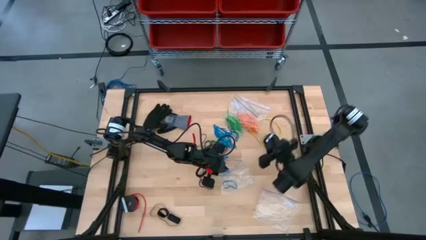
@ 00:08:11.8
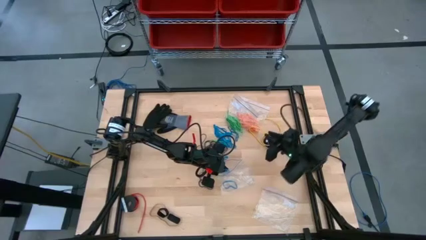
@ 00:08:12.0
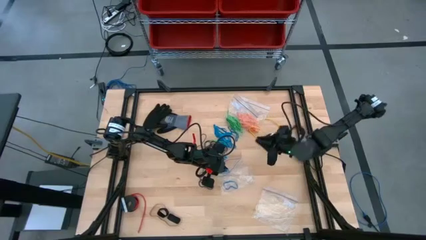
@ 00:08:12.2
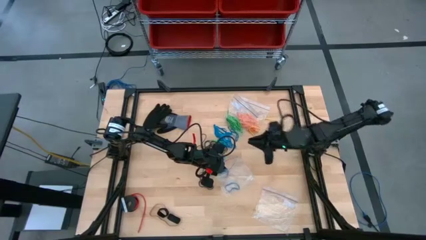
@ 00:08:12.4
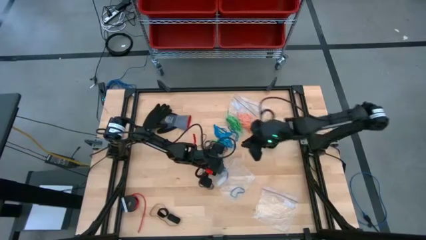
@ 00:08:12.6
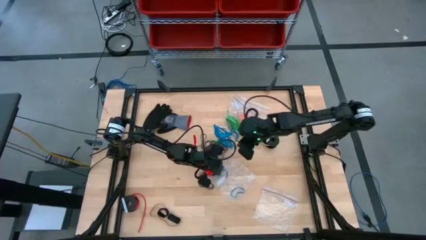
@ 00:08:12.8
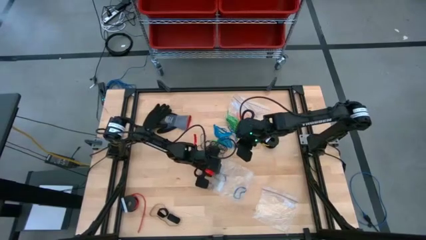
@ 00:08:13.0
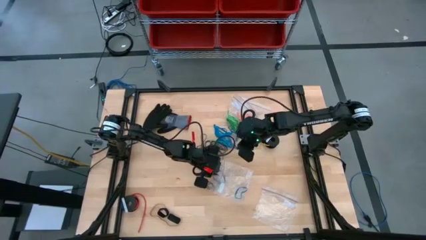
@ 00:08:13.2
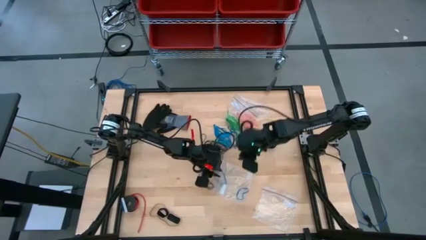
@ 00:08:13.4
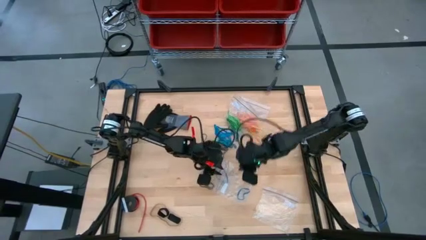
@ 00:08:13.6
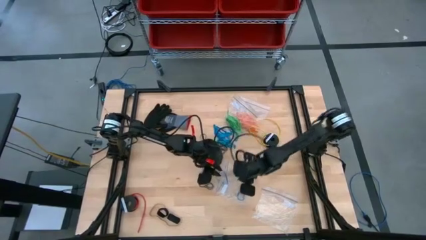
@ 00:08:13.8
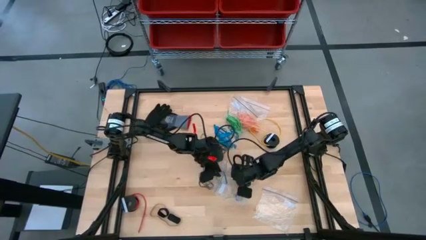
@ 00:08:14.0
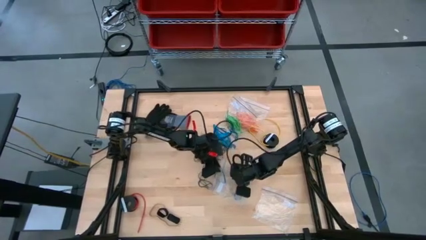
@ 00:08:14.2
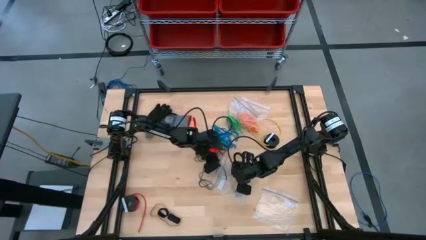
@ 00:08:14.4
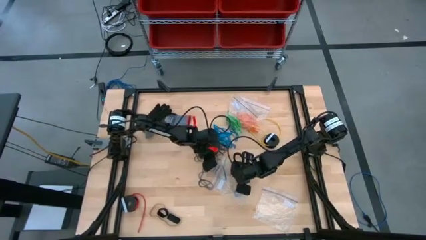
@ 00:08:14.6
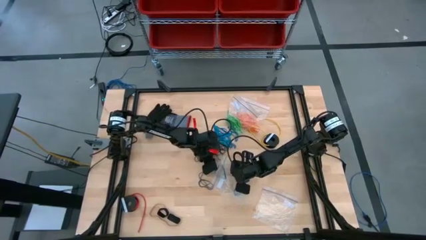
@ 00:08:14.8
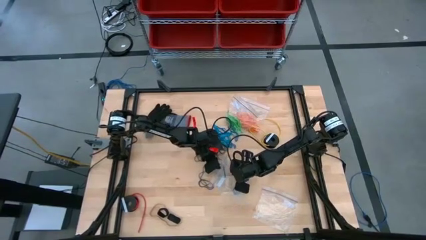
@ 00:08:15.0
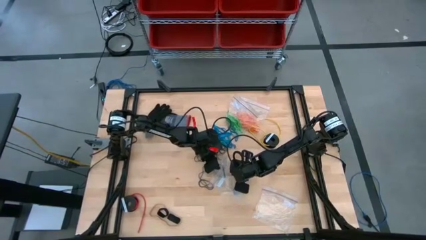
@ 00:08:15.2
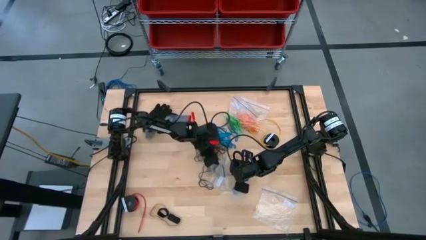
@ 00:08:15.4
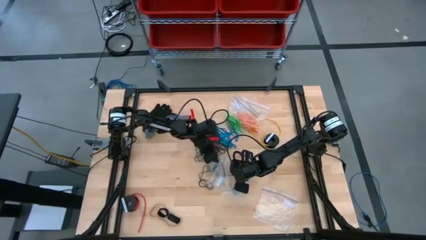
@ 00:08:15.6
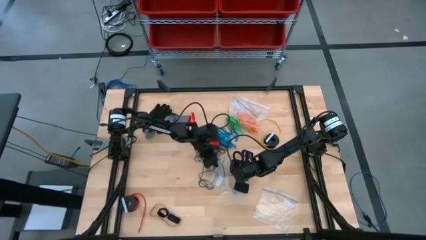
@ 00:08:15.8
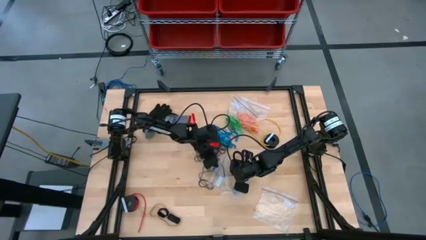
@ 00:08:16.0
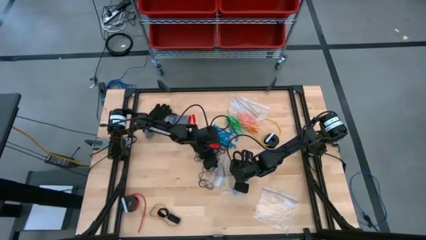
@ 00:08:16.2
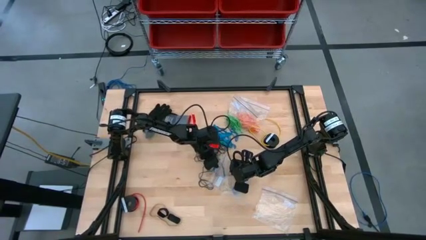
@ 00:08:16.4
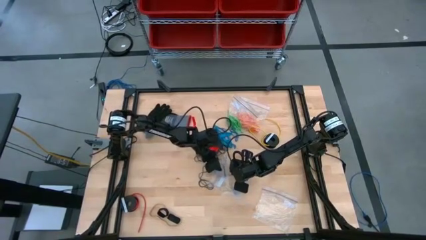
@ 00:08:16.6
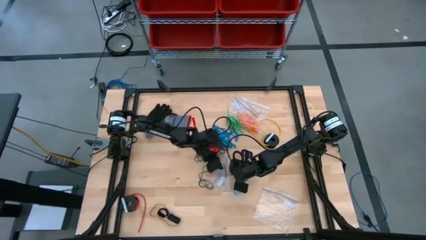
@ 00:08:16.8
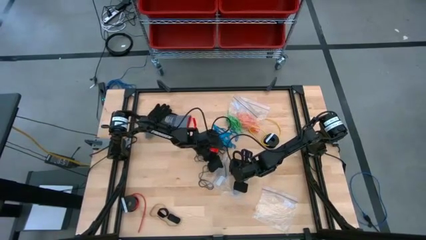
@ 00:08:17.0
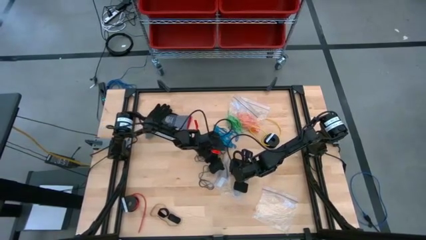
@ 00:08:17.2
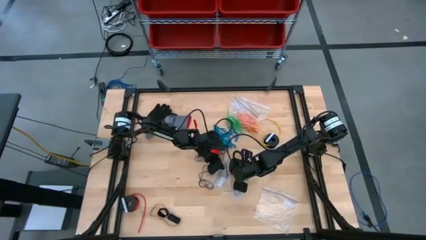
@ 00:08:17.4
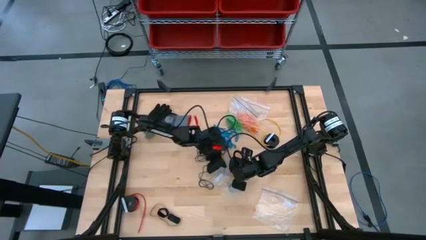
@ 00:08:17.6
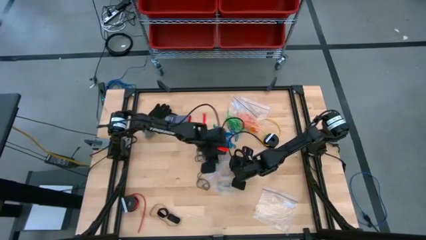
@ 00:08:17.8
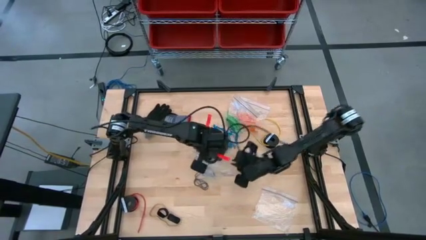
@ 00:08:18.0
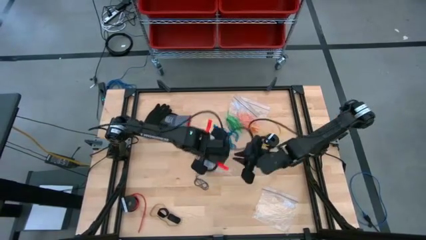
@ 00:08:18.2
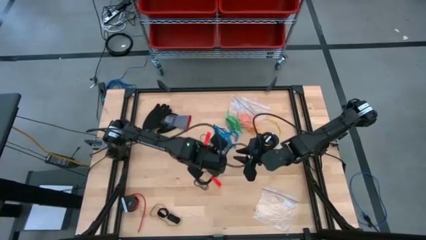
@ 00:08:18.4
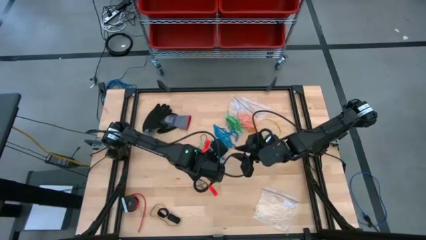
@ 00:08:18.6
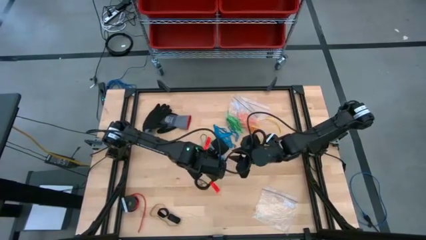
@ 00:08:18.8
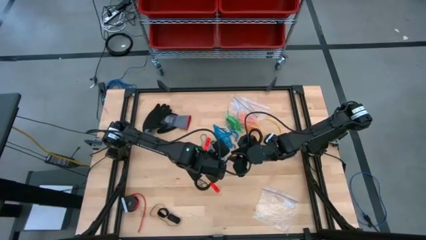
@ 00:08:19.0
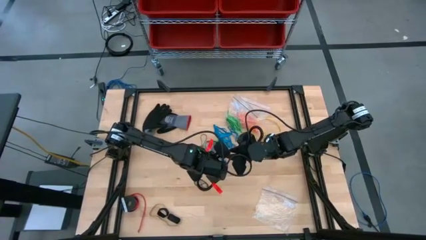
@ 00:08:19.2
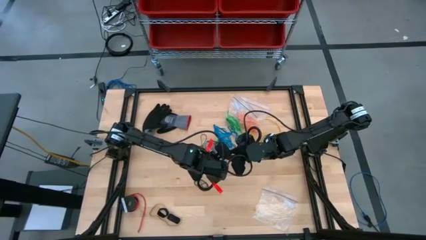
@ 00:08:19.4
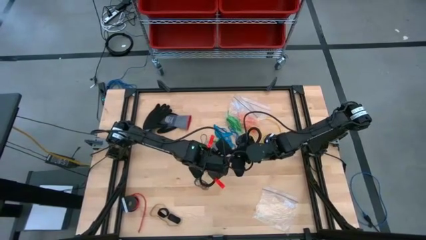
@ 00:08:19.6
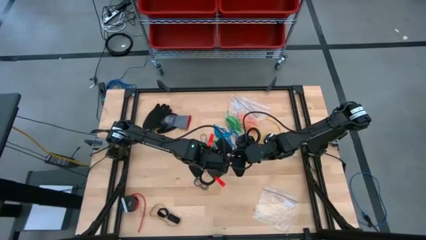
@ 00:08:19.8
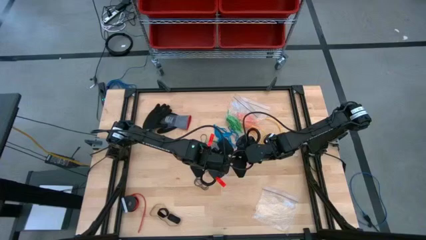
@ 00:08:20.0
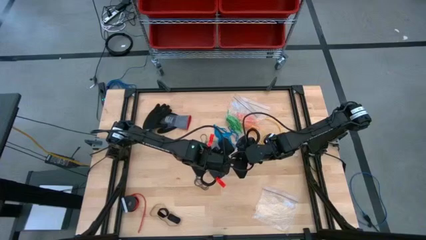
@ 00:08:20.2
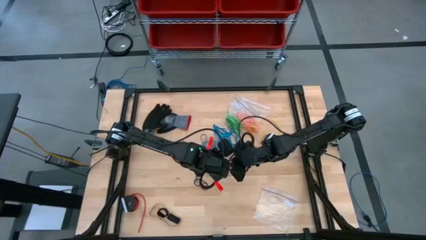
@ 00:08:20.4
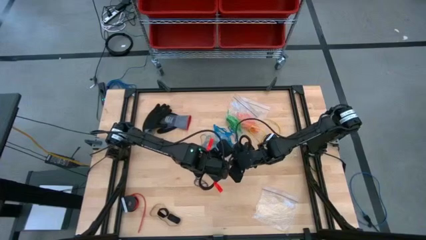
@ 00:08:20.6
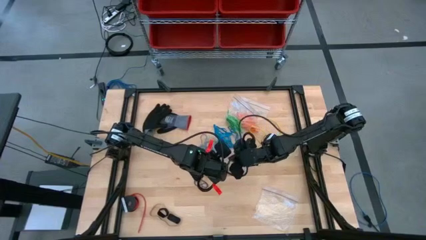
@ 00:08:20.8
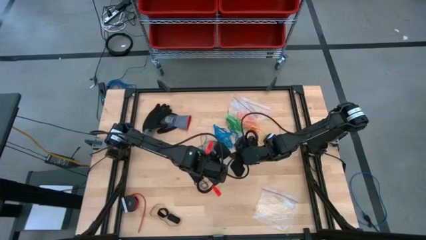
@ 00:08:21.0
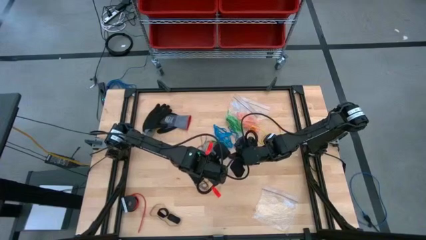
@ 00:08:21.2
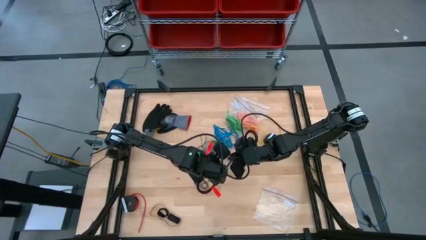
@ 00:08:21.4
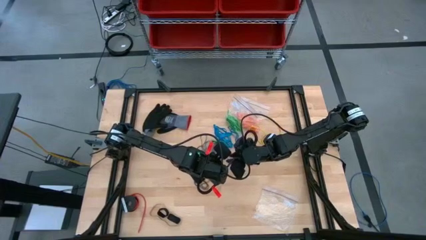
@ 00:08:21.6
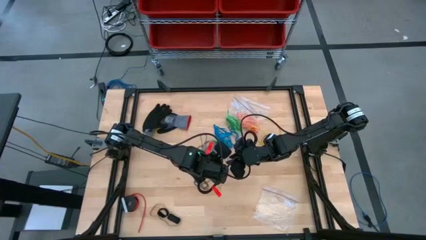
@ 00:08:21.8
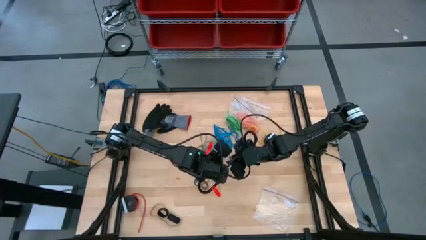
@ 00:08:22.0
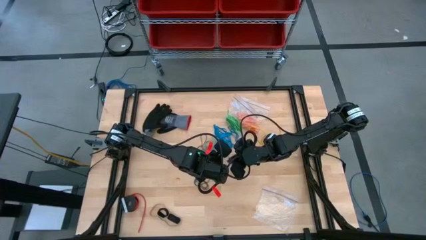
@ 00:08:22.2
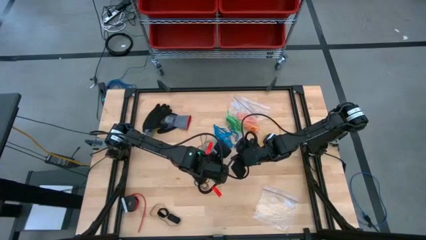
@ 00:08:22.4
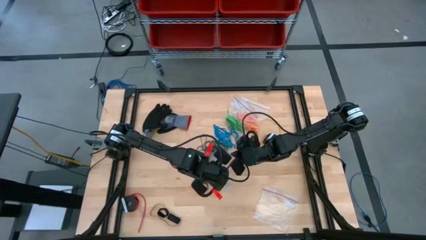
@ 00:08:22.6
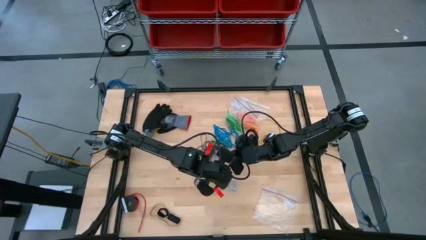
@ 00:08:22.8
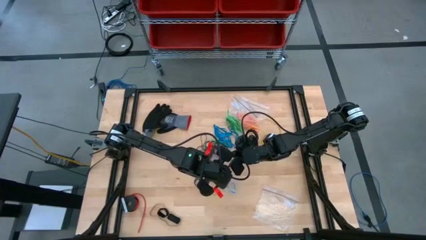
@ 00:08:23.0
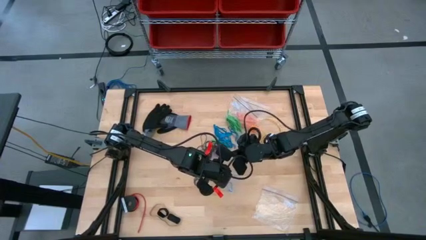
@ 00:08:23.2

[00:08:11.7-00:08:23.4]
Task: Sort rubber bands
Put the blue rubber band into the transparent zip bag

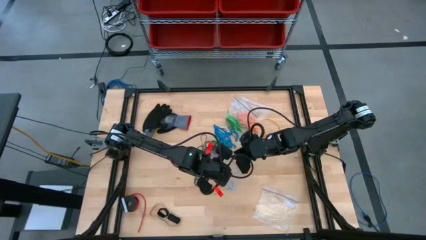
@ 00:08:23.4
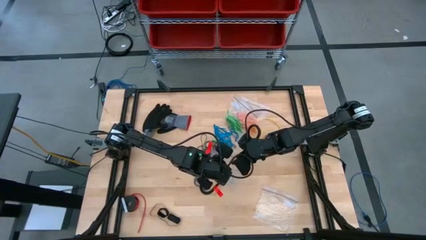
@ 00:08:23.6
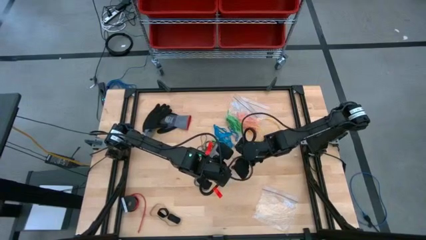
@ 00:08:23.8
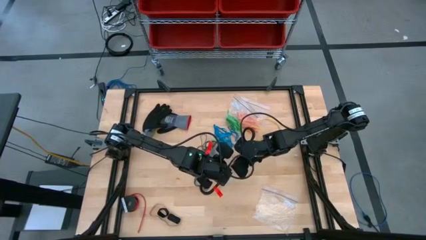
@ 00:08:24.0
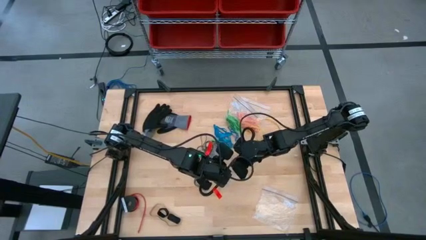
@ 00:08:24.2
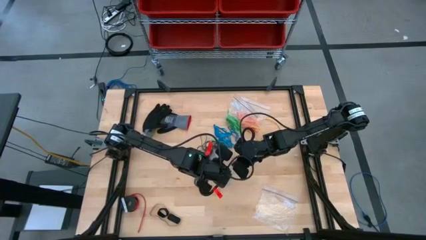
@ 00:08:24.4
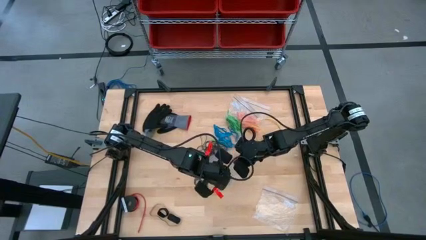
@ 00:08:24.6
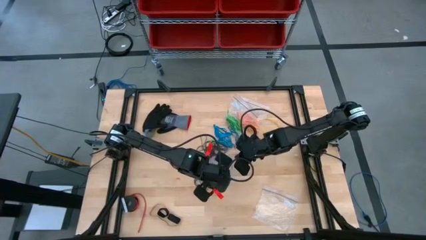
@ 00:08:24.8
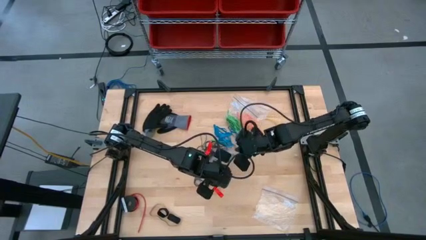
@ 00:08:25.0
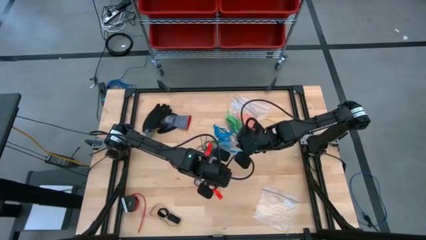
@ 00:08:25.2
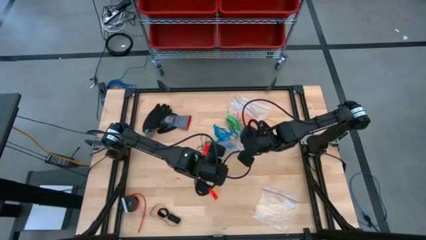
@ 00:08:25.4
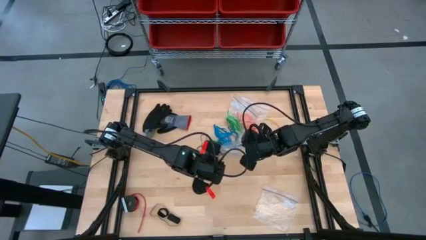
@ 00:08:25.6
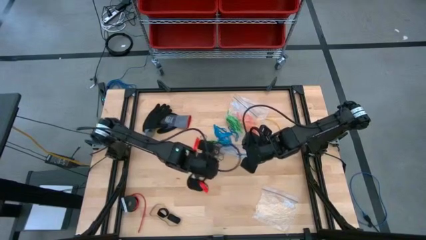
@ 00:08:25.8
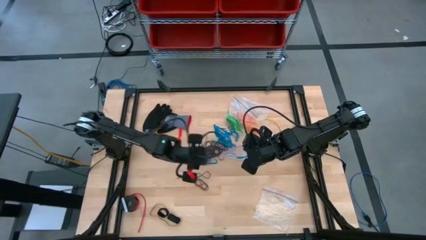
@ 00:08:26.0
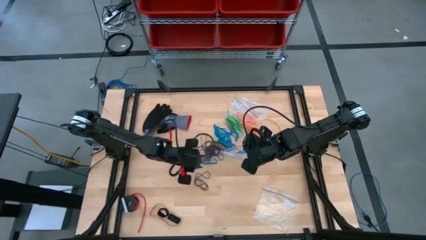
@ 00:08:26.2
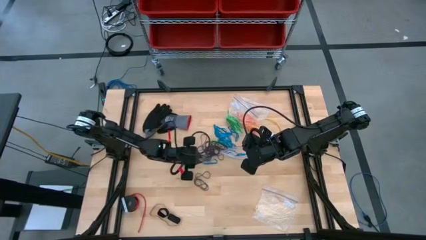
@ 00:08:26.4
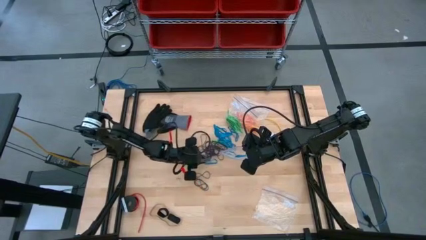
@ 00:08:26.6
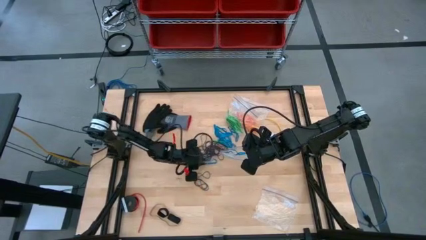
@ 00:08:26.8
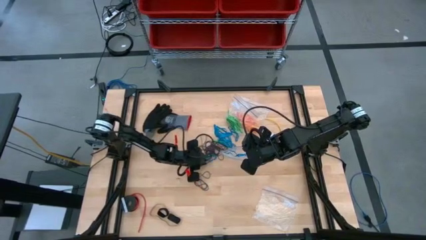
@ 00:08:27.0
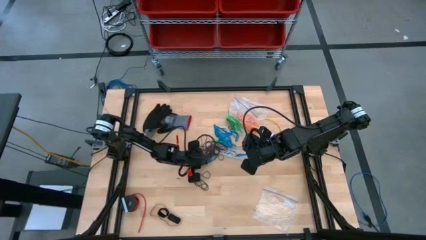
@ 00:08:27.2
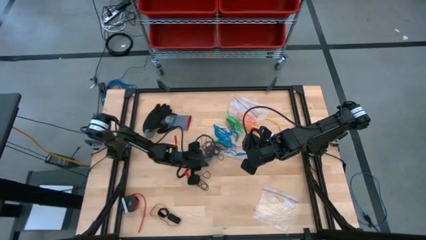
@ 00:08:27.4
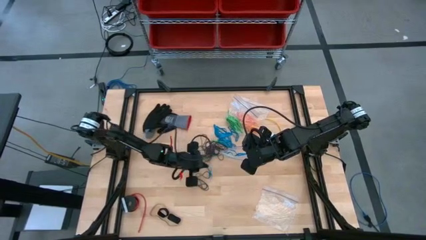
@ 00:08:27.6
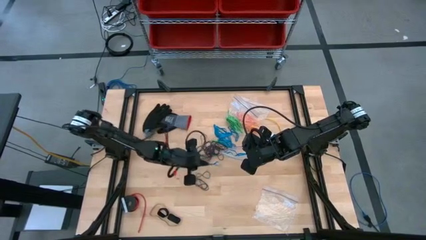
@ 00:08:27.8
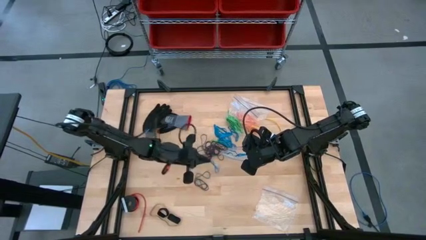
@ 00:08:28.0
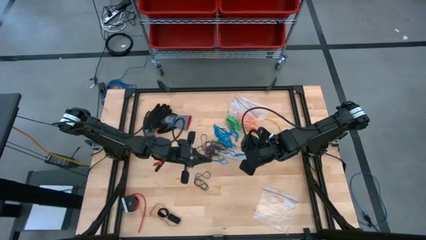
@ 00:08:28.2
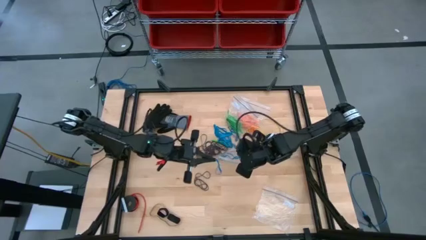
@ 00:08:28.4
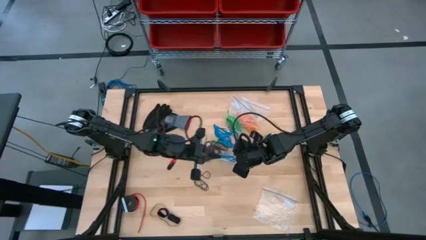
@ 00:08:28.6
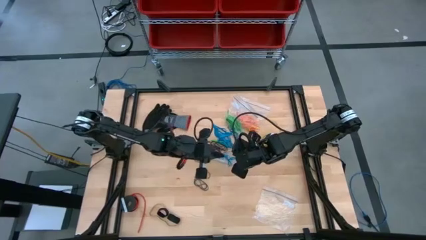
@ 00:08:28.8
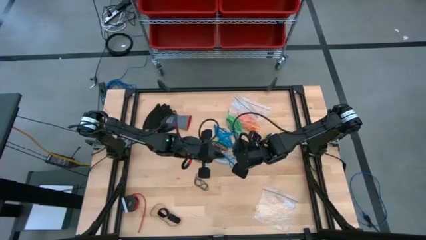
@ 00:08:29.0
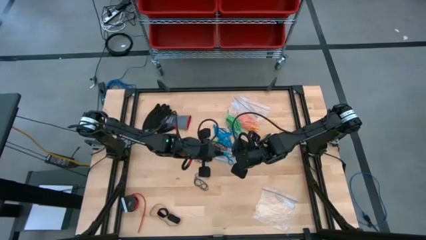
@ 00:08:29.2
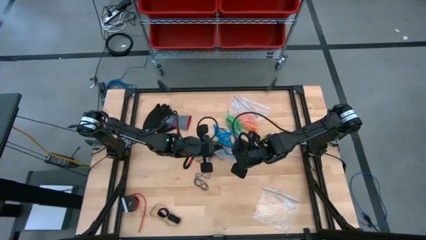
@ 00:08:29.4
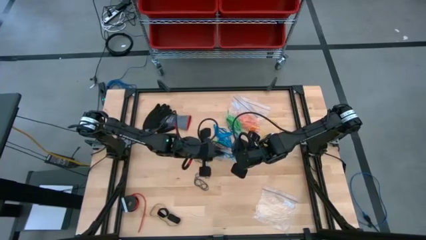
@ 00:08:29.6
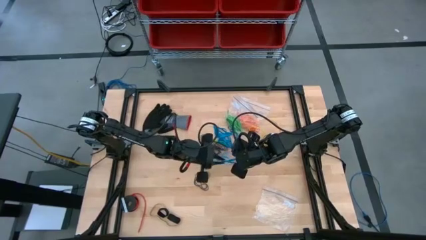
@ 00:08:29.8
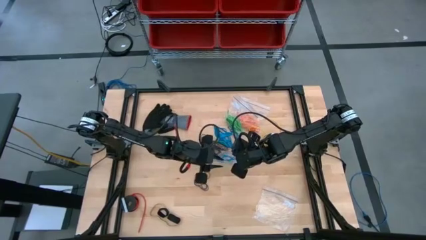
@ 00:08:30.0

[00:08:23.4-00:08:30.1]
Put the blue rubber band into the transparent zip bag
